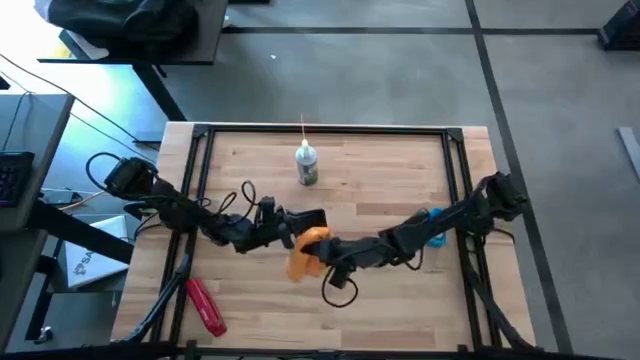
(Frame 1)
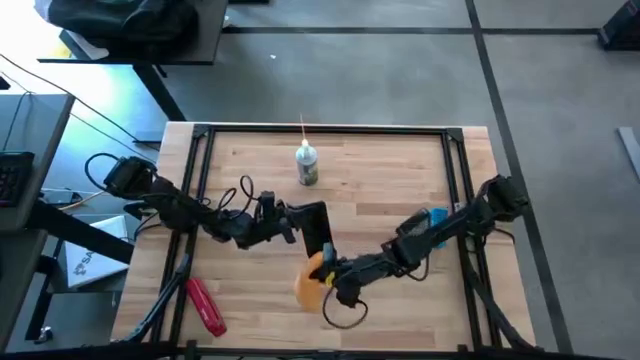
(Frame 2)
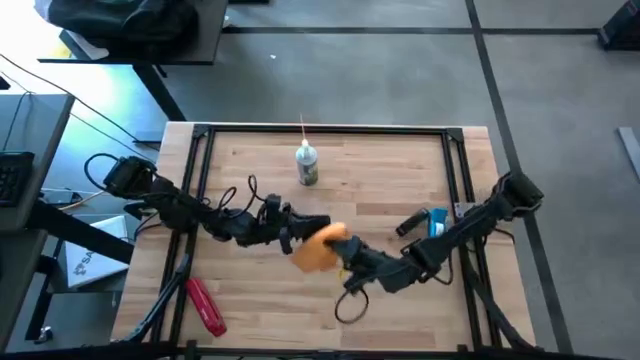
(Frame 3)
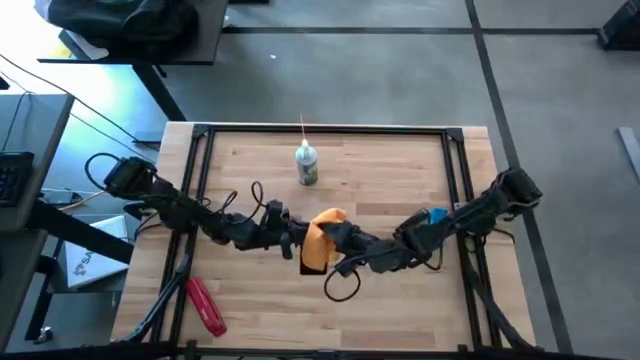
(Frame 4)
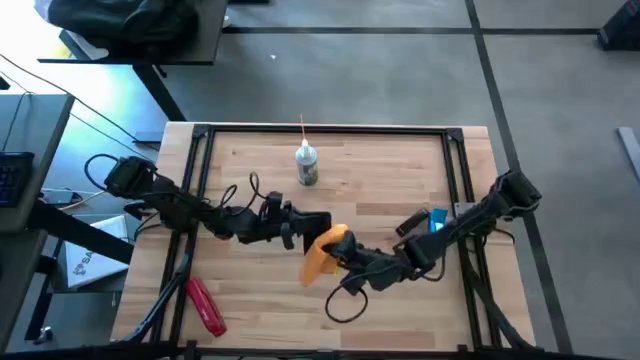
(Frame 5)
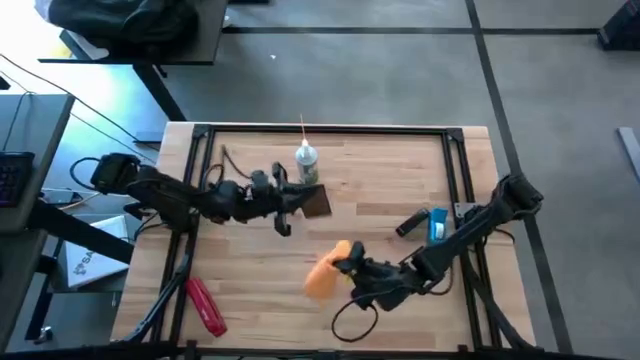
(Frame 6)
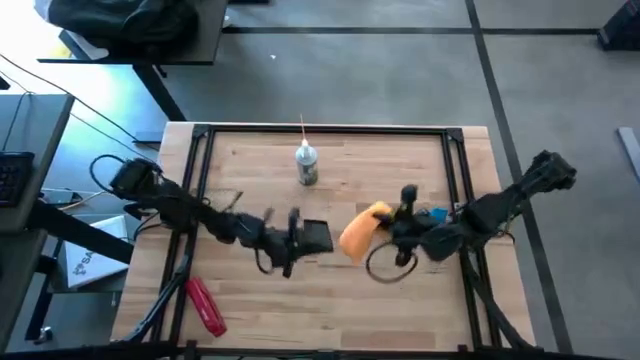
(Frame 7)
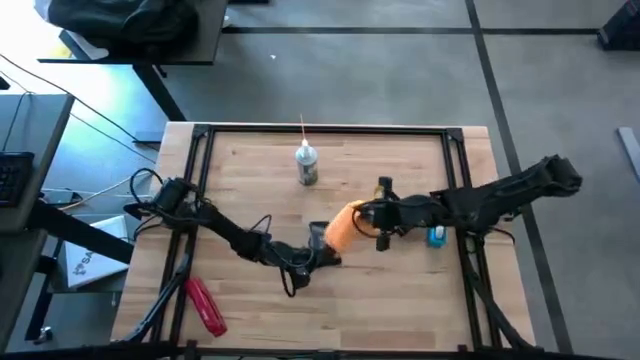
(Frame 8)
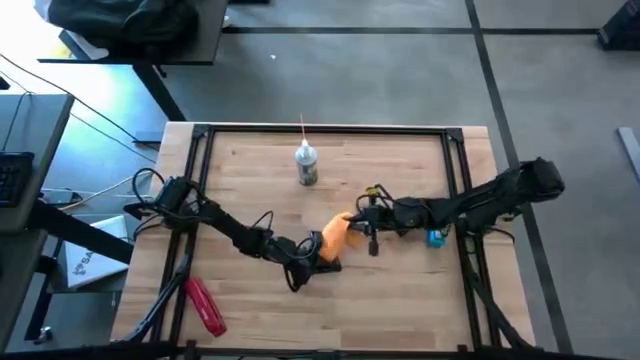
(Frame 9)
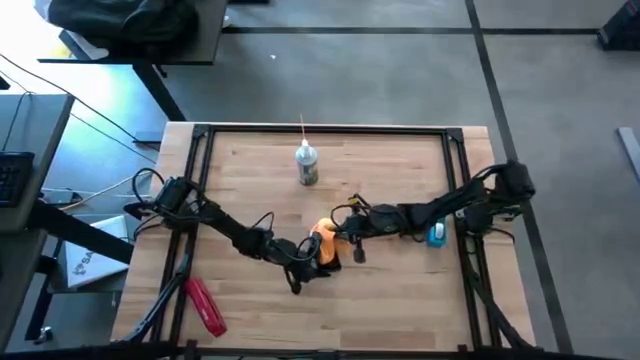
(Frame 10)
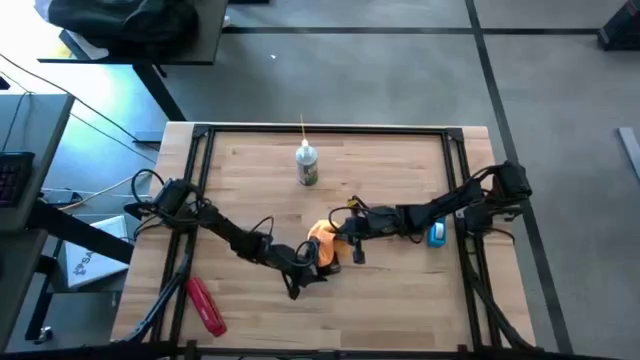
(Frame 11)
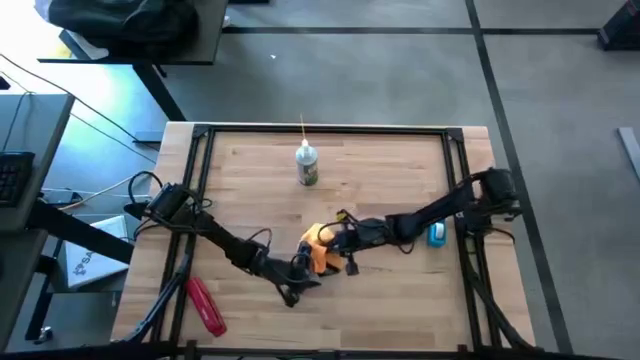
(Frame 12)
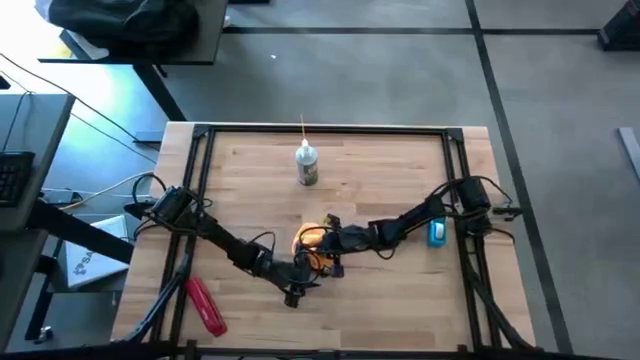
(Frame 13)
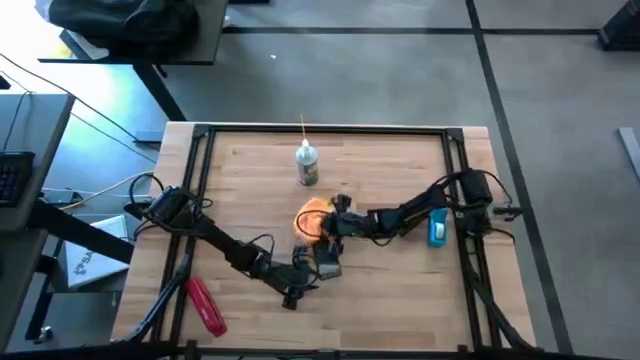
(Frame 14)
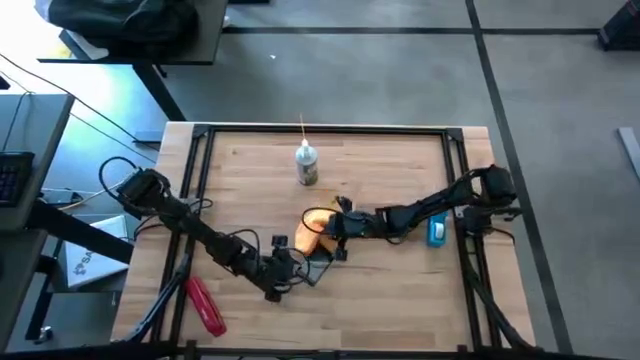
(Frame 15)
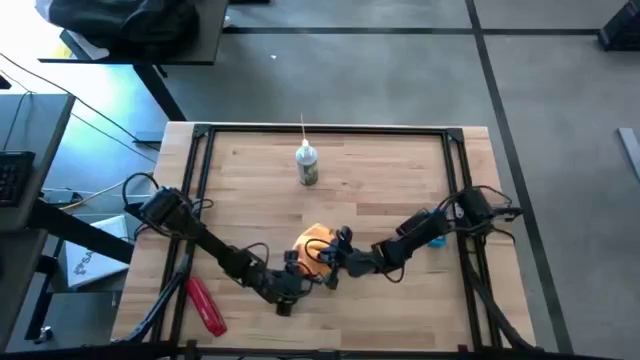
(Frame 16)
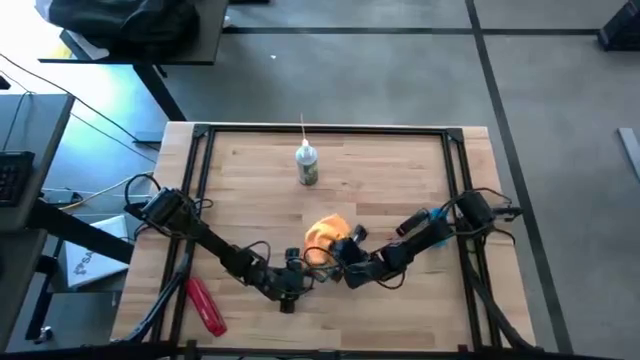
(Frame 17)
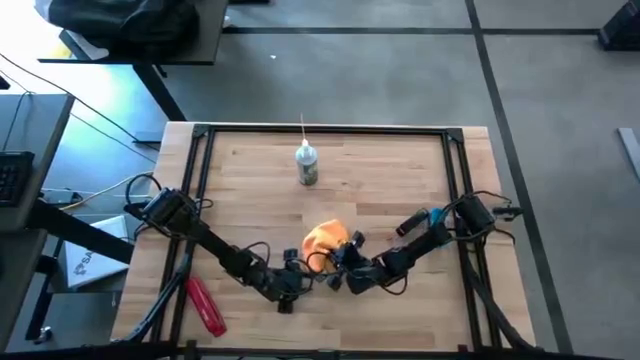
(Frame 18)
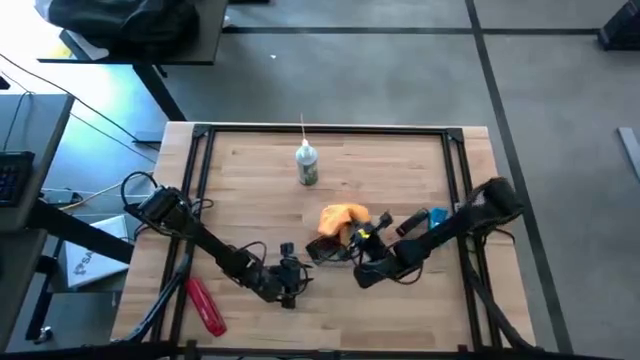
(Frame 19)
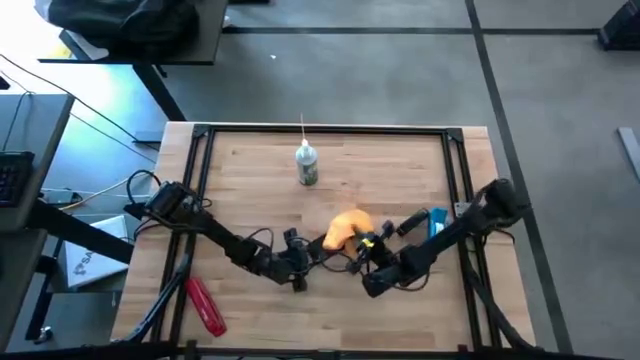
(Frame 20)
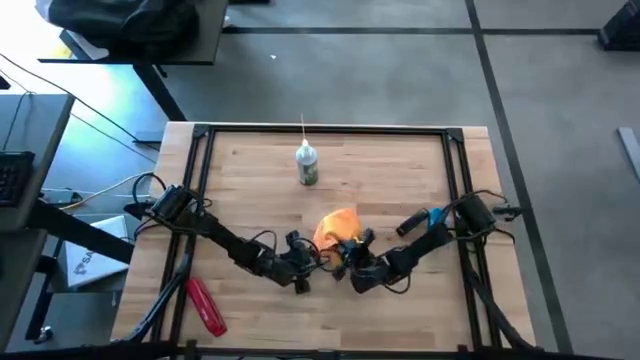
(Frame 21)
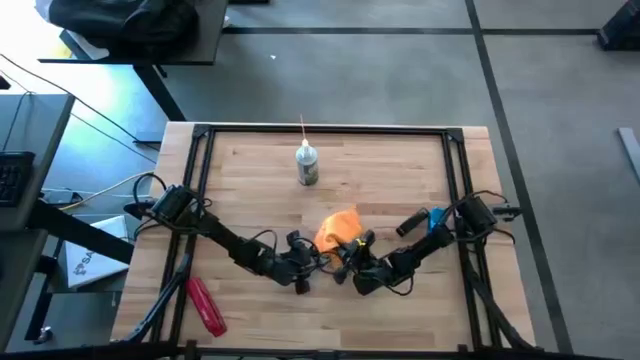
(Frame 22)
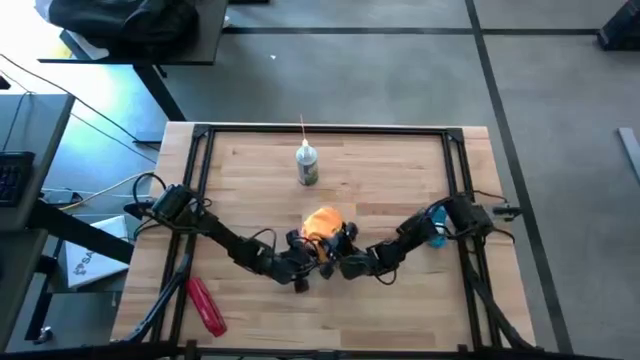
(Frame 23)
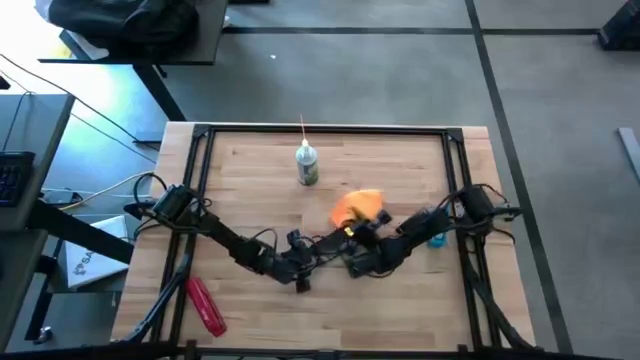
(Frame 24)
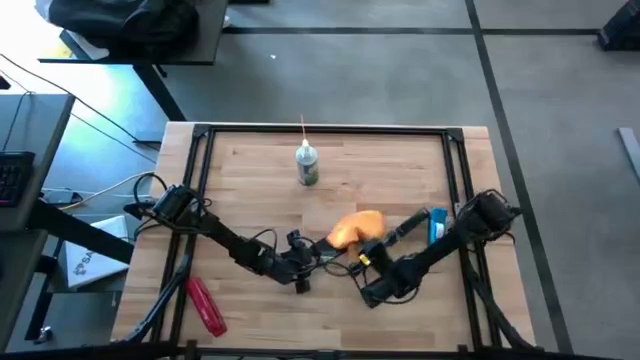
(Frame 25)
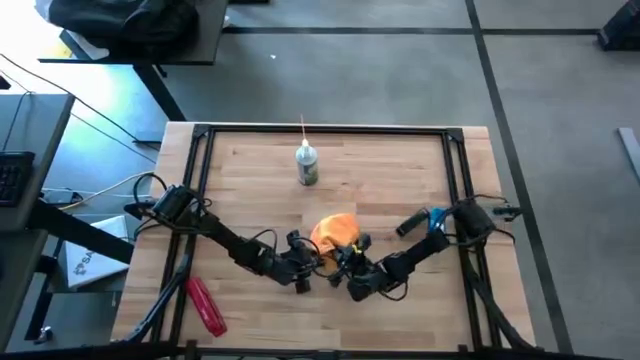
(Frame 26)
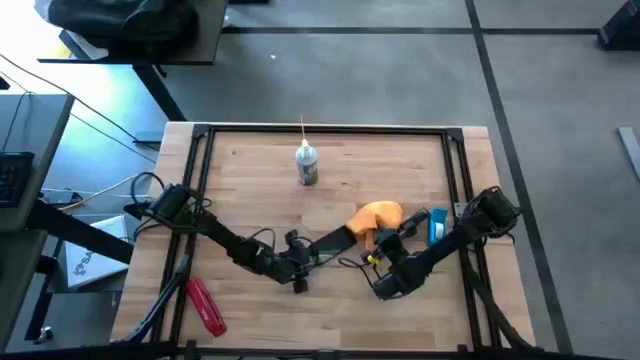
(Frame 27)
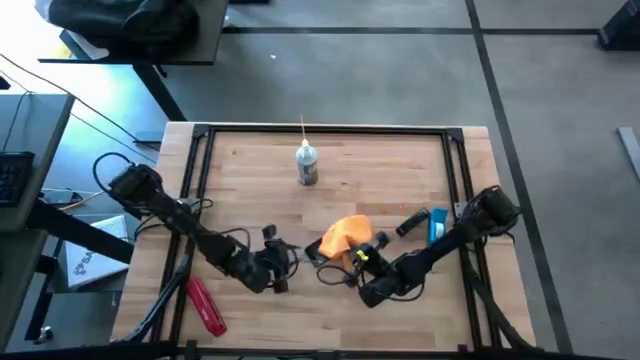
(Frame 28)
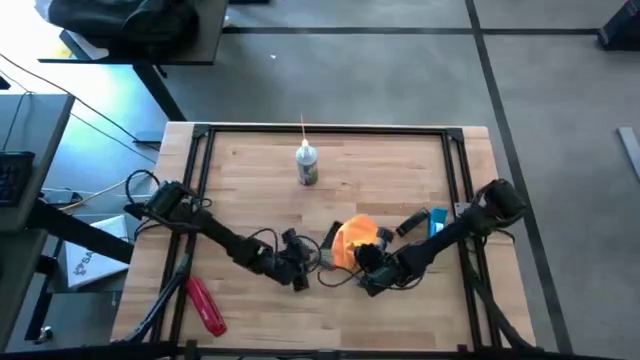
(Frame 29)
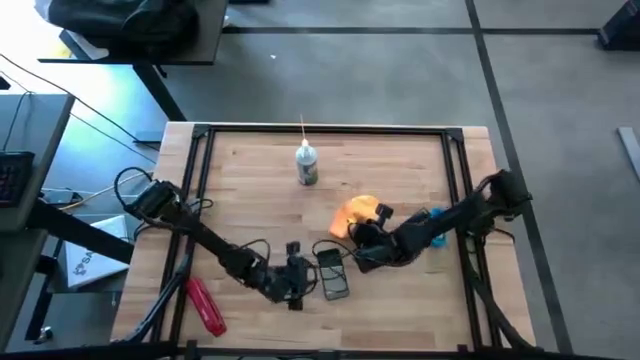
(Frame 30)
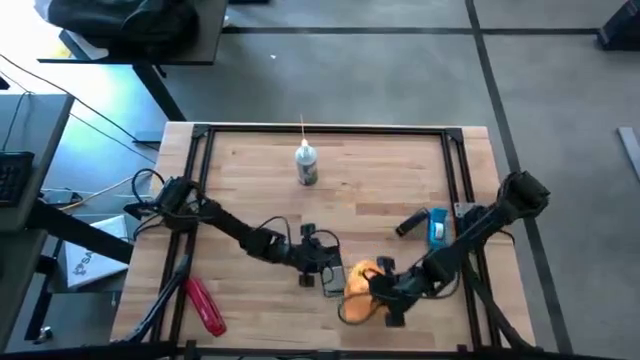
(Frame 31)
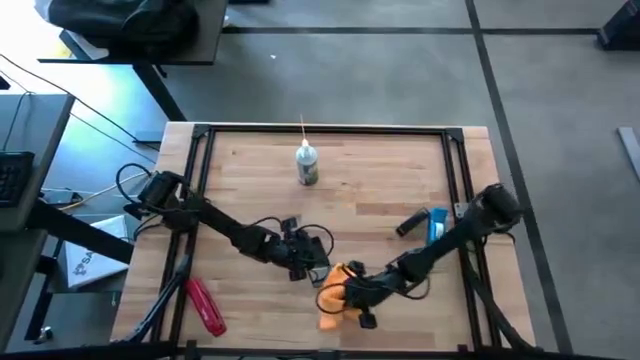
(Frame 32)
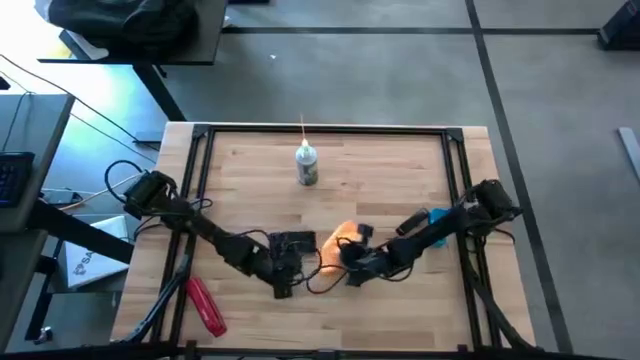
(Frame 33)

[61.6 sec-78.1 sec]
Task: Apply microfiber cloth
Wipe the front of the cellphone with a microfiber cloth

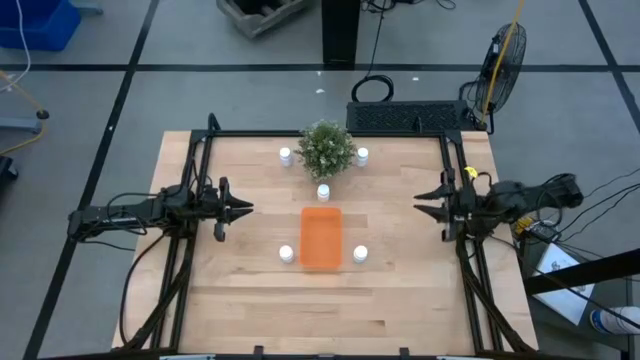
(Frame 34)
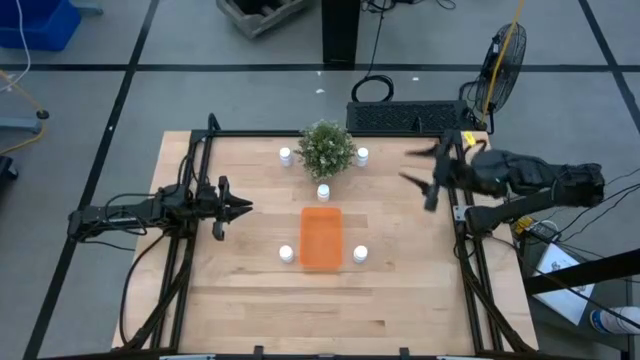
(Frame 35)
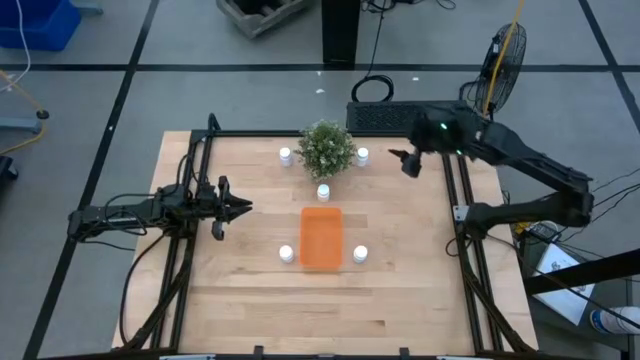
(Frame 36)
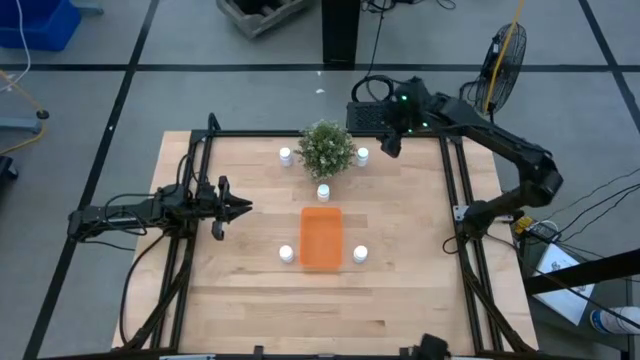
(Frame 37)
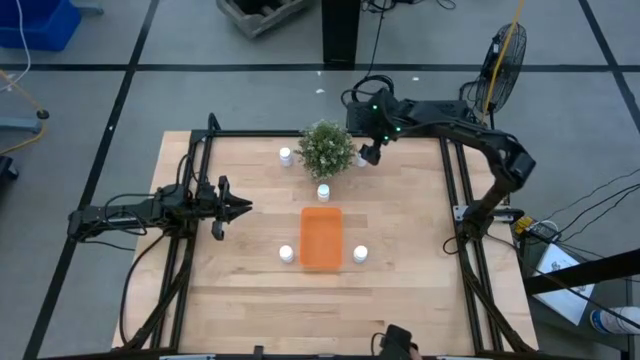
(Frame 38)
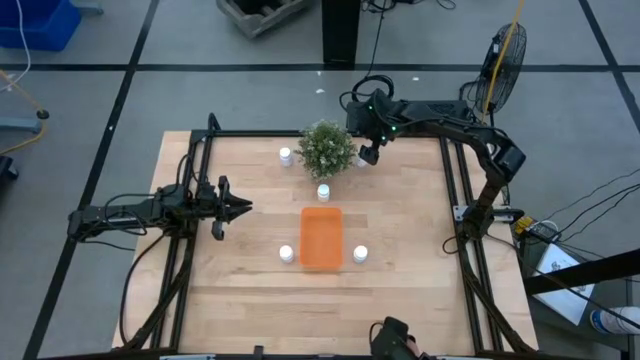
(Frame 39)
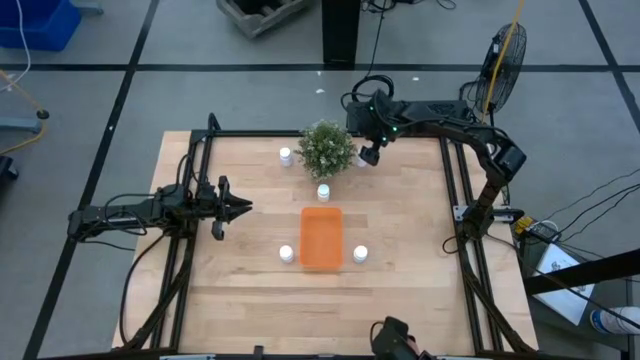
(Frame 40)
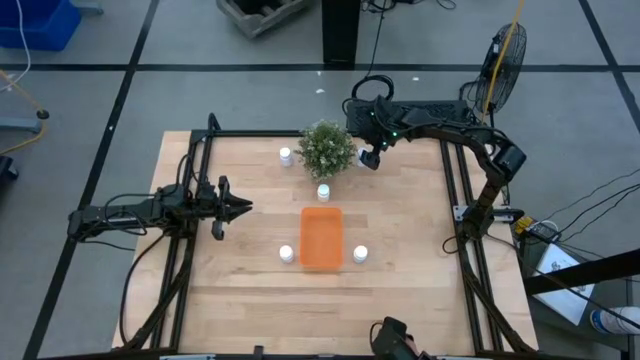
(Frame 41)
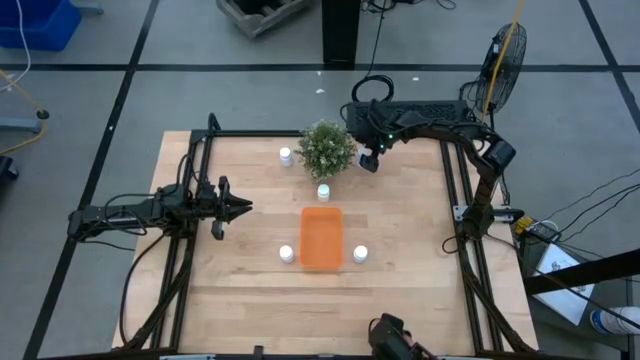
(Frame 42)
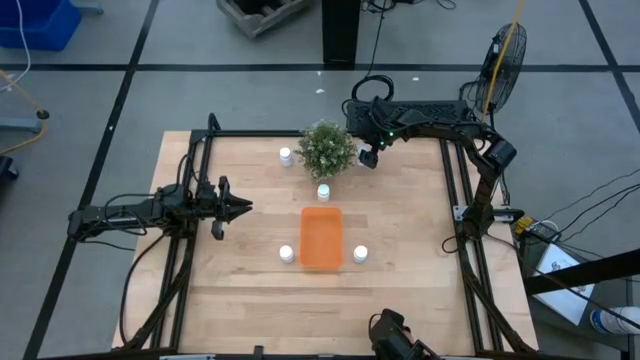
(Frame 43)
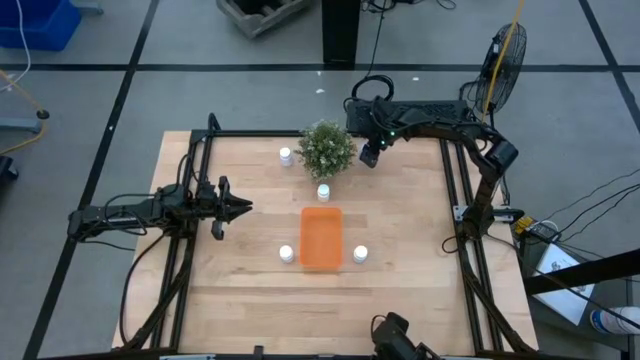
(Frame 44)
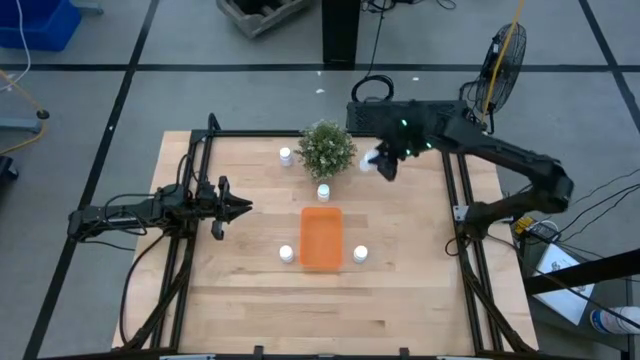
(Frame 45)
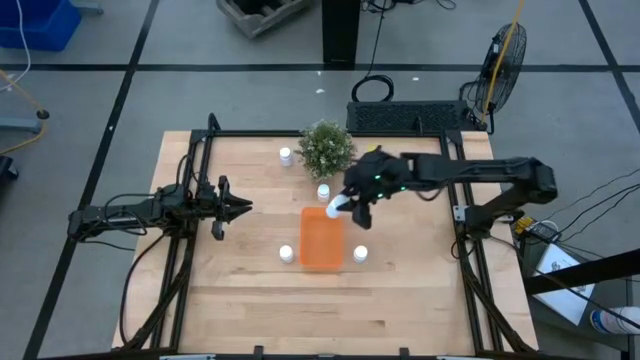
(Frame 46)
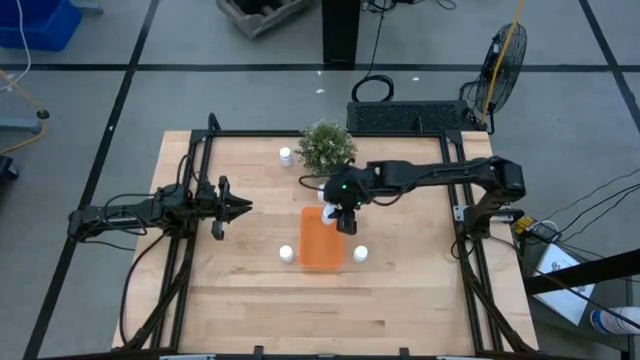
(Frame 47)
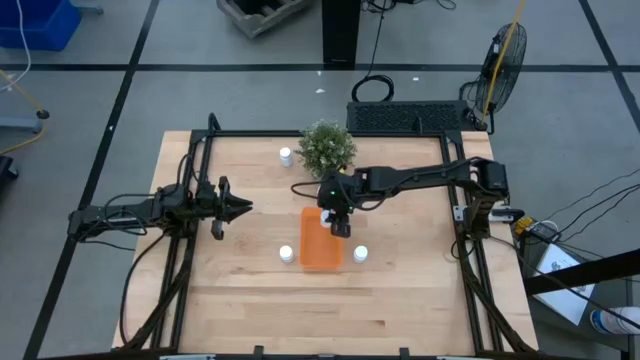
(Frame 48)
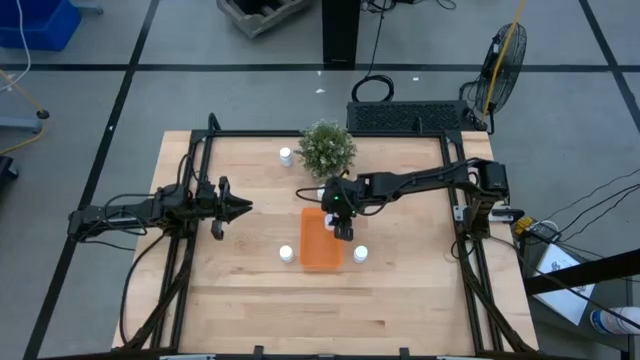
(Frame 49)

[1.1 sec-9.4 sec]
Task: Pick and place pill bottles into a basket
Put the white medicine bottle into the orange bin
